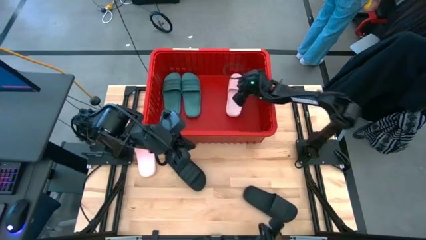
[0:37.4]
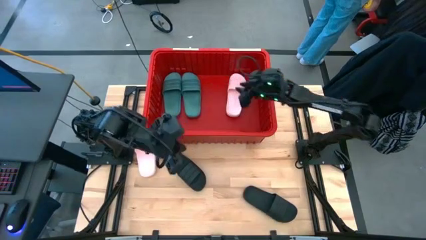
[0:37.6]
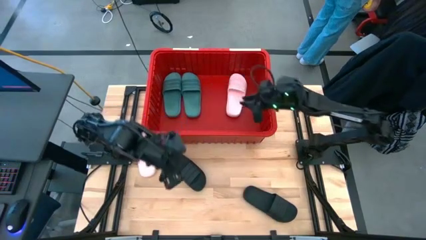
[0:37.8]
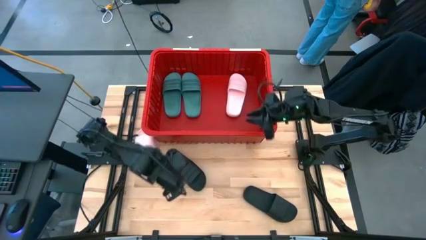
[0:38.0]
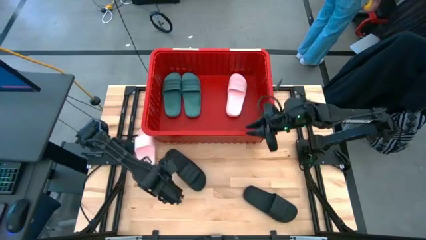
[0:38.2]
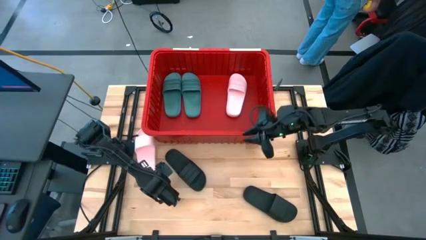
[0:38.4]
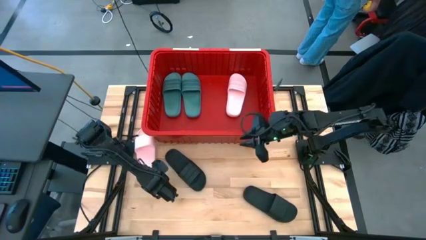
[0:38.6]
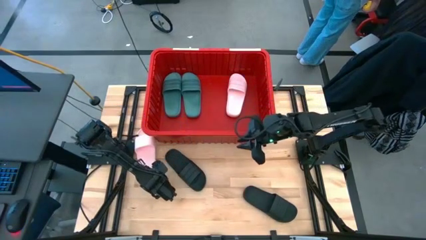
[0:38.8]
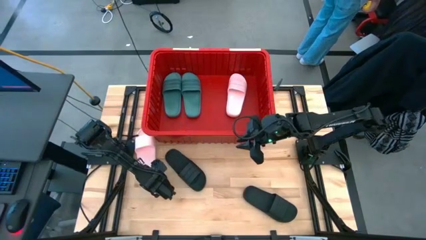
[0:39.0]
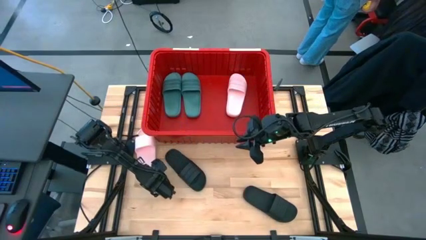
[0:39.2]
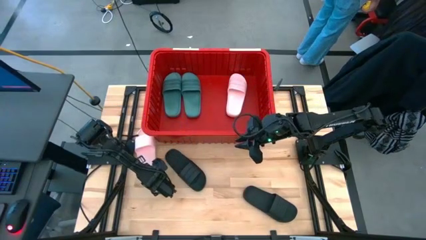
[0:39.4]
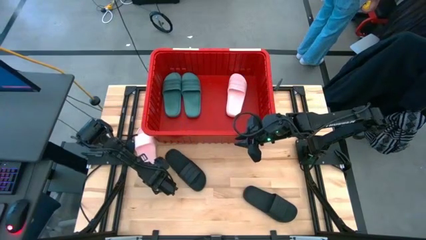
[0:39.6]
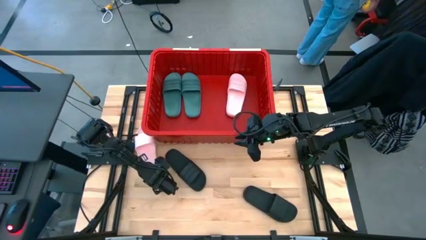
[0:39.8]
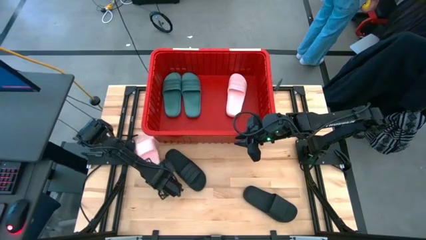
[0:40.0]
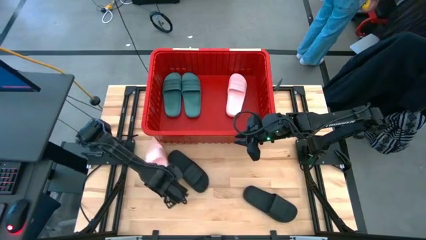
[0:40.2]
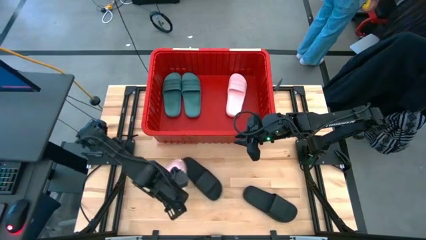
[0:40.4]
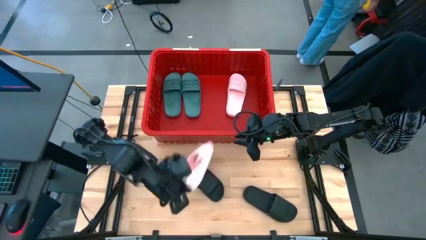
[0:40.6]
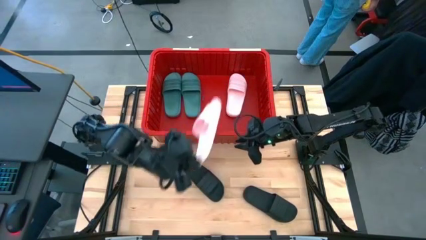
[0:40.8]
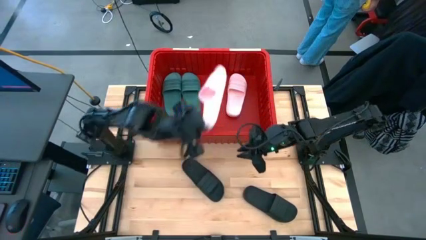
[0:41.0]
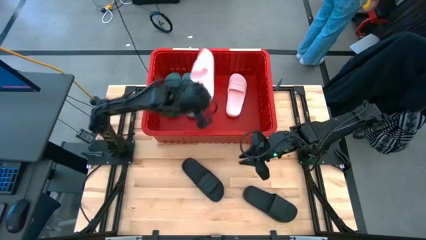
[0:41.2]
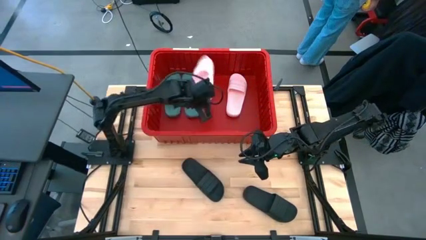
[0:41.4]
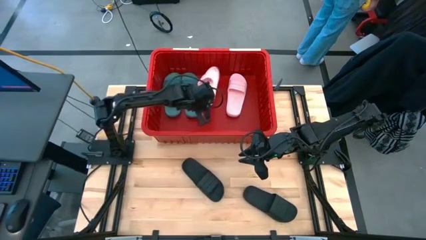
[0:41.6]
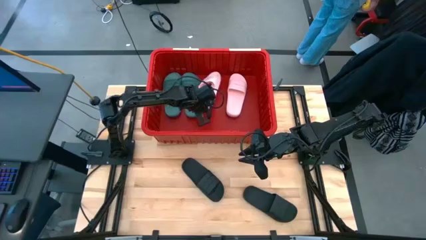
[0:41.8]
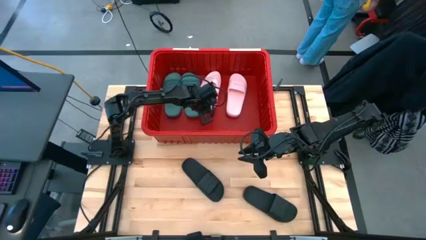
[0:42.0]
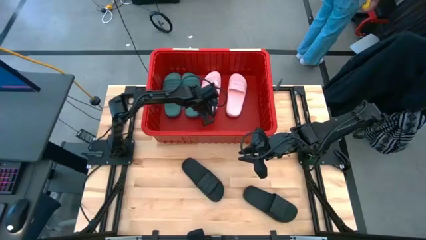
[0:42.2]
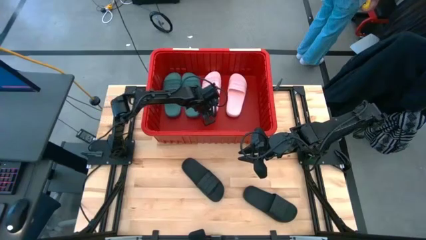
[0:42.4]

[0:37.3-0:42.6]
Task: Pick and place slides into bin
Put the pink slipper into the red bin

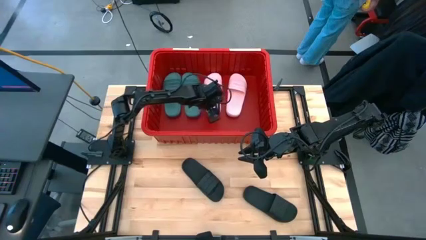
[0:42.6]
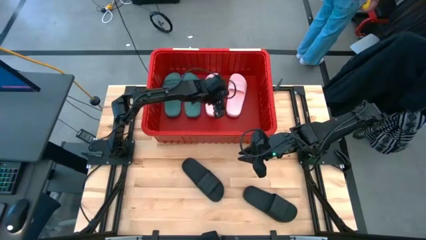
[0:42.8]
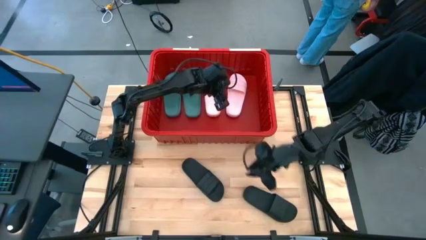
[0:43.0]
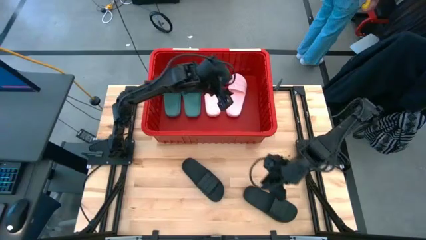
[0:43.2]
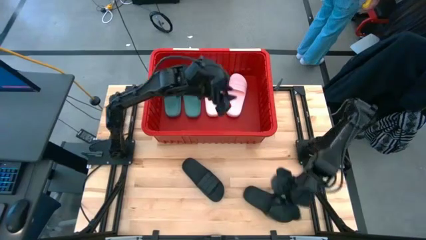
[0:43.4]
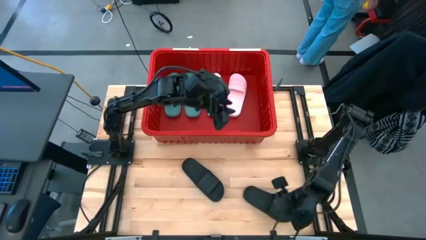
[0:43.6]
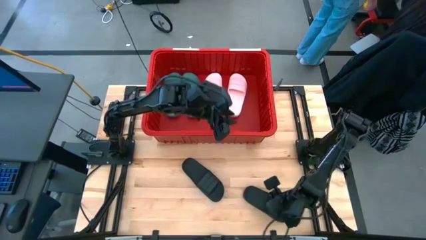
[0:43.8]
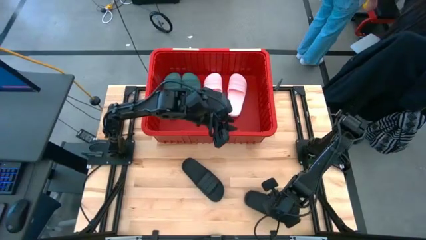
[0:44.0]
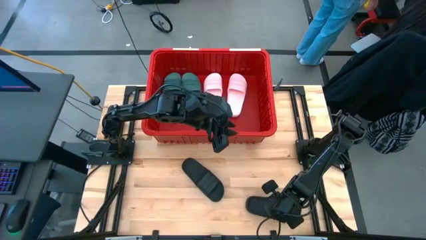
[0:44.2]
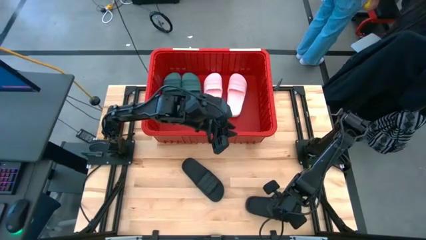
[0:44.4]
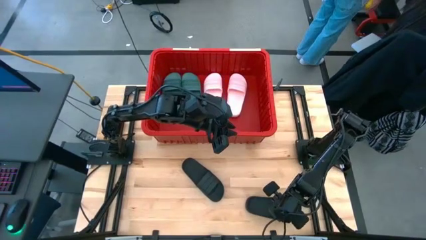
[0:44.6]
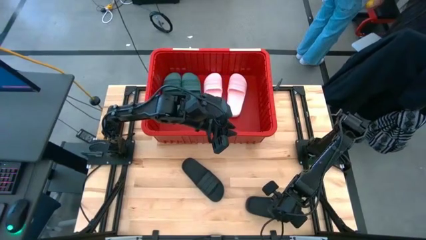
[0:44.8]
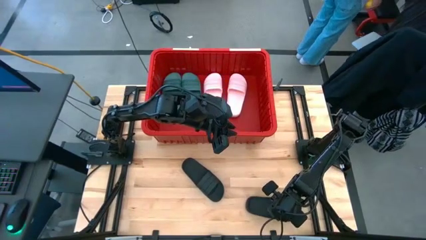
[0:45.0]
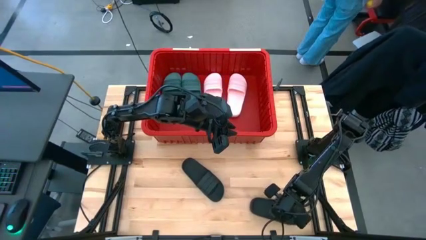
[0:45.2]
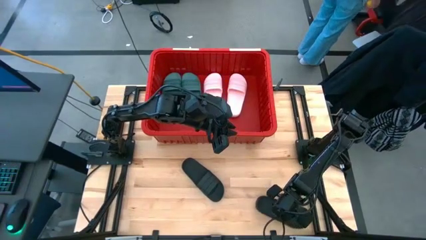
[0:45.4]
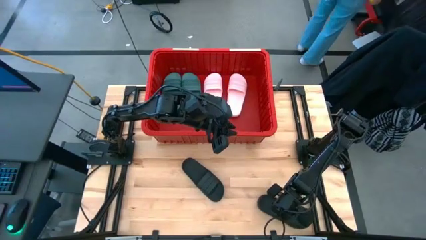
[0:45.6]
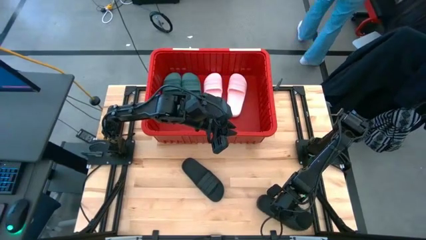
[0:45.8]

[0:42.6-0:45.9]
Put the right black slipper into the red bin

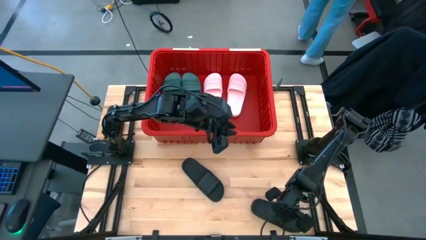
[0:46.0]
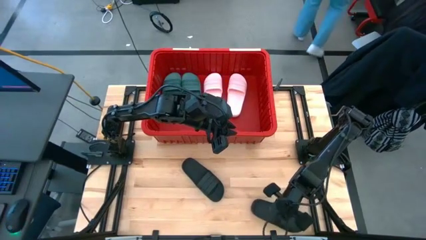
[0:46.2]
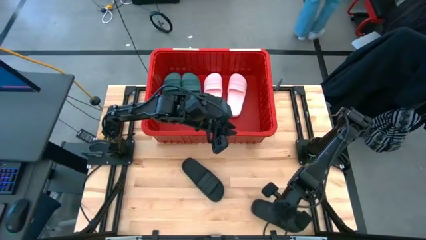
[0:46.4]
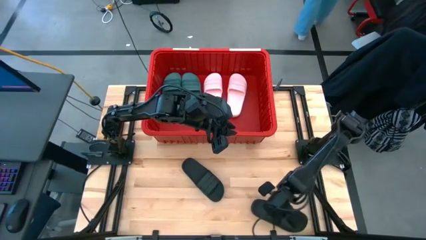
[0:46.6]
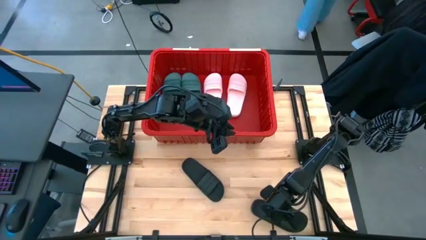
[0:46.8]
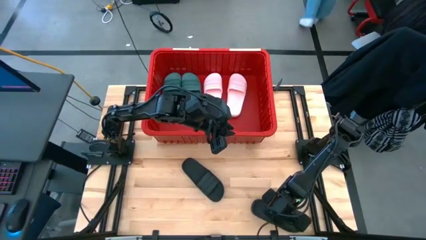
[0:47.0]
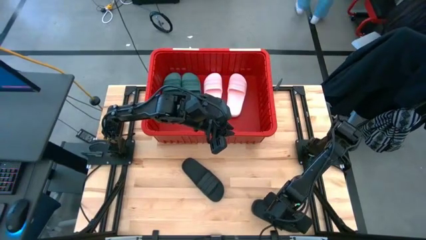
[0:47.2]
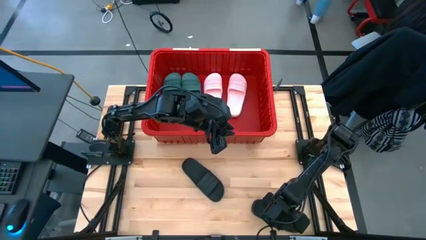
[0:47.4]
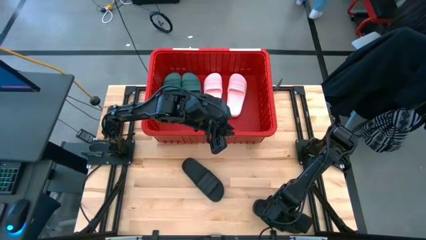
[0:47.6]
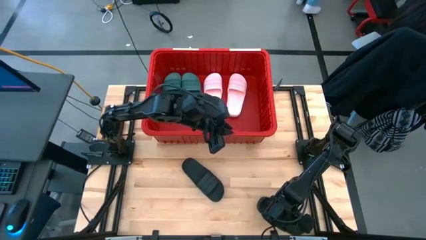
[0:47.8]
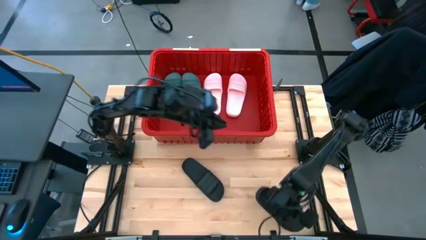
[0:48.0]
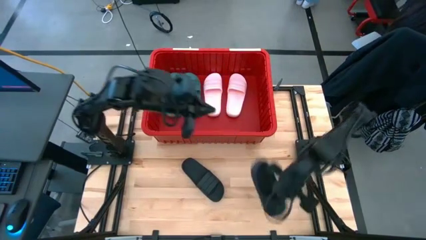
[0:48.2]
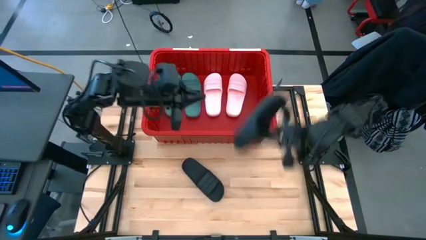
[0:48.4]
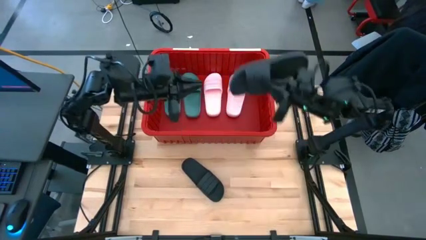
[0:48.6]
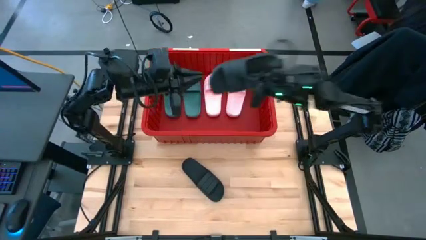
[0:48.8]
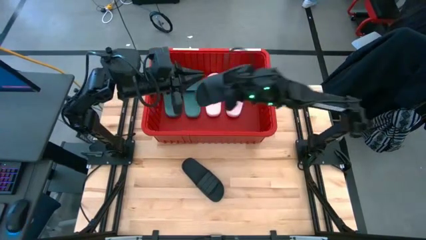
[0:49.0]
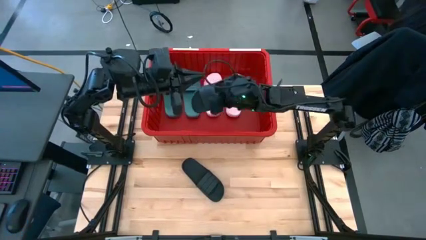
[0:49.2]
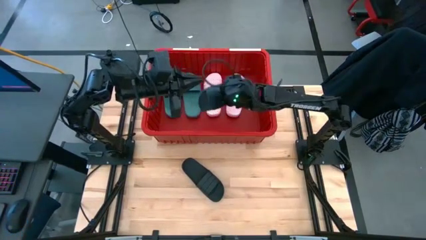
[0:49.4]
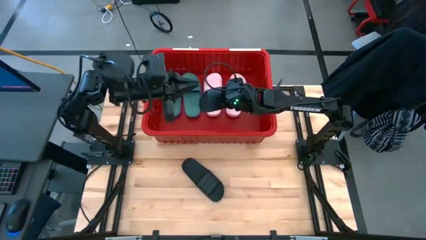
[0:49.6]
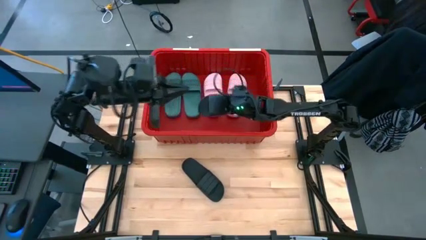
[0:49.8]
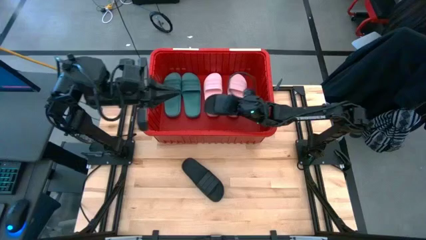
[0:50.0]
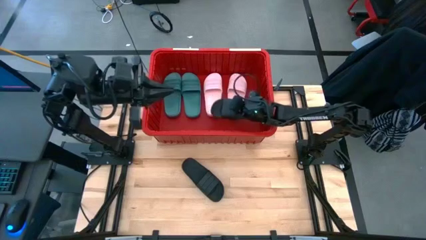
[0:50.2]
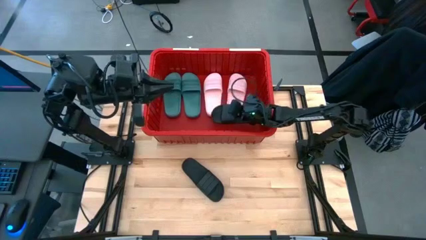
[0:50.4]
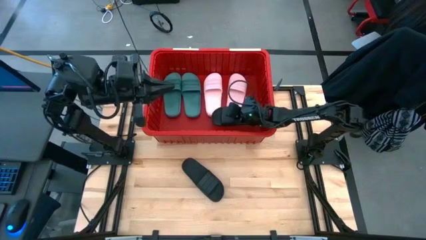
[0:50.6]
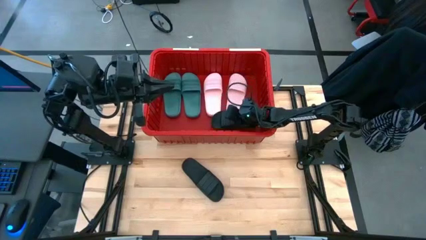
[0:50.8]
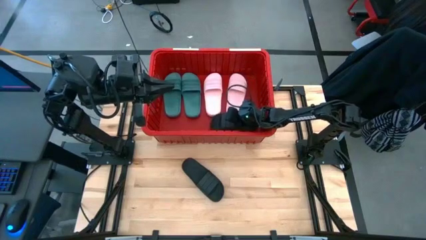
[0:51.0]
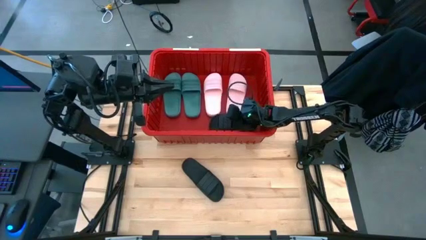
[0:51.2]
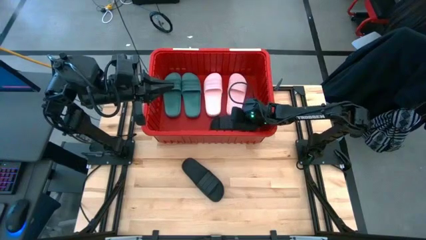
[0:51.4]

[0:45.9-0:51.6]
Put the right black slipper into the red bin

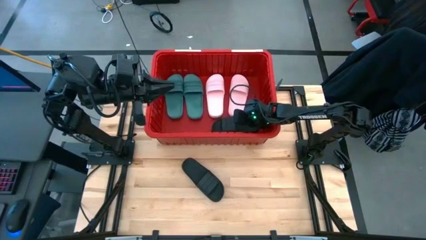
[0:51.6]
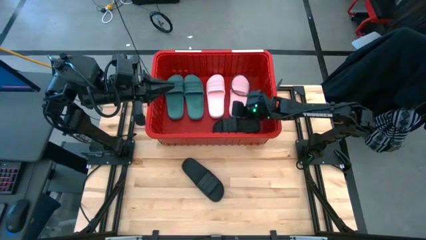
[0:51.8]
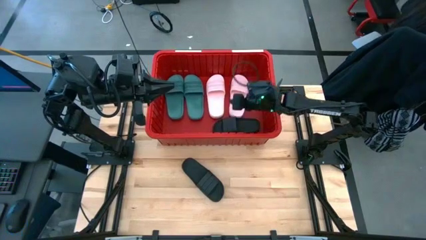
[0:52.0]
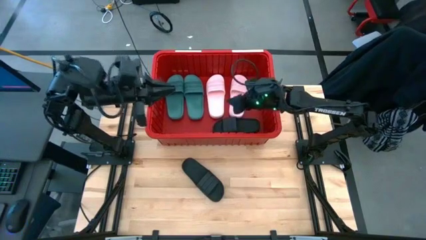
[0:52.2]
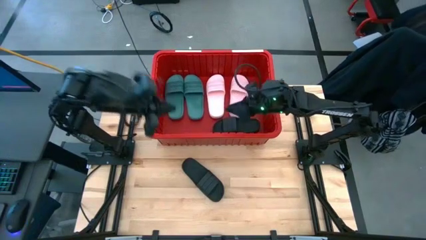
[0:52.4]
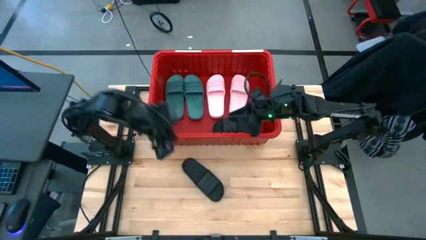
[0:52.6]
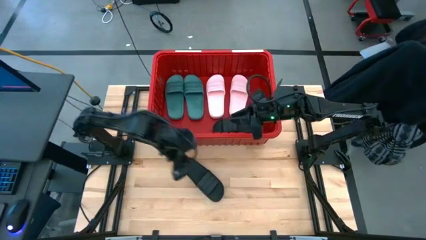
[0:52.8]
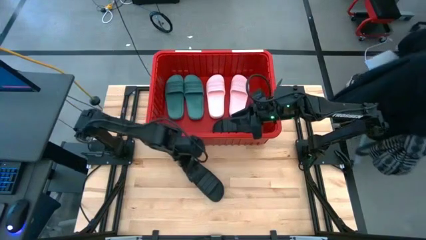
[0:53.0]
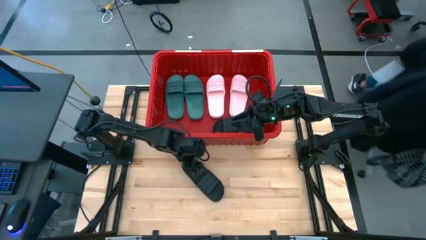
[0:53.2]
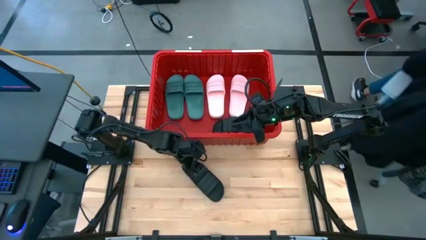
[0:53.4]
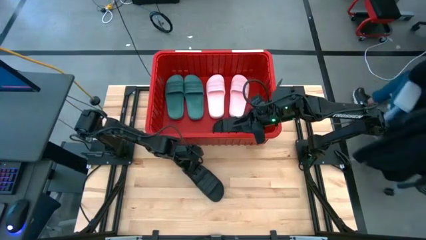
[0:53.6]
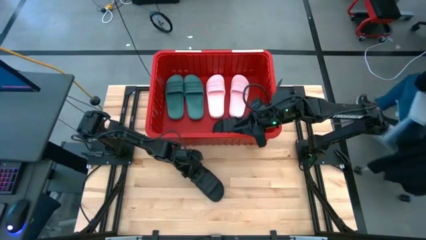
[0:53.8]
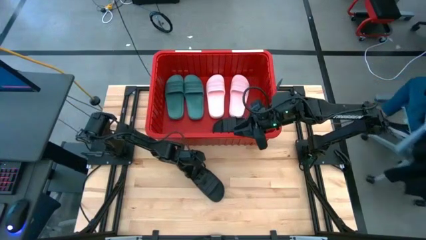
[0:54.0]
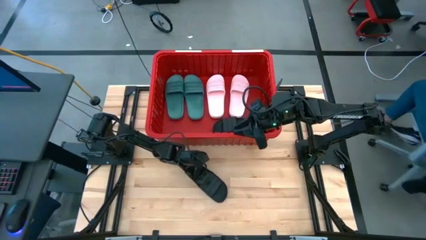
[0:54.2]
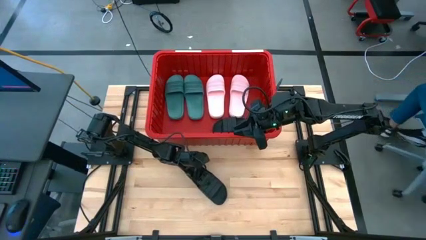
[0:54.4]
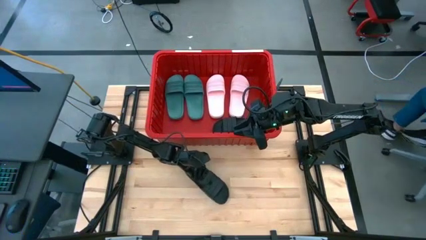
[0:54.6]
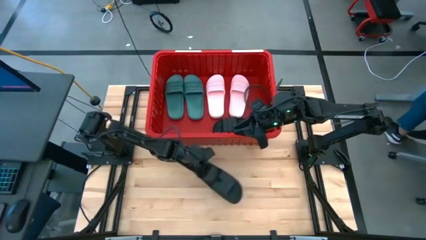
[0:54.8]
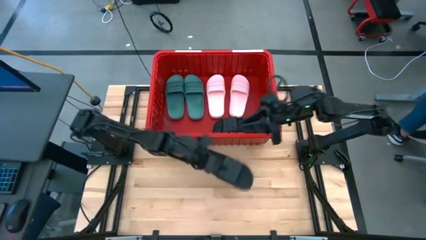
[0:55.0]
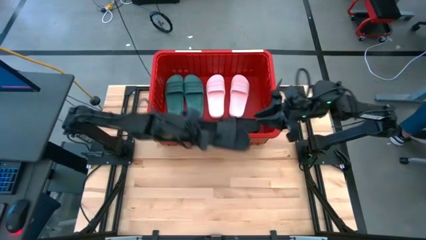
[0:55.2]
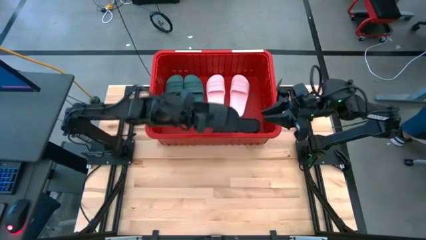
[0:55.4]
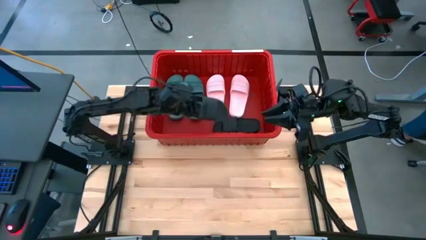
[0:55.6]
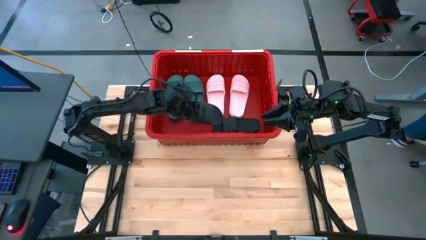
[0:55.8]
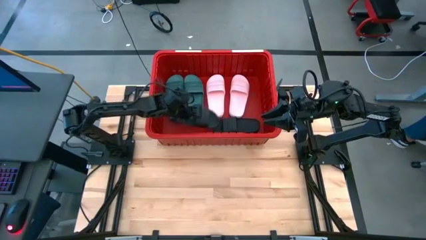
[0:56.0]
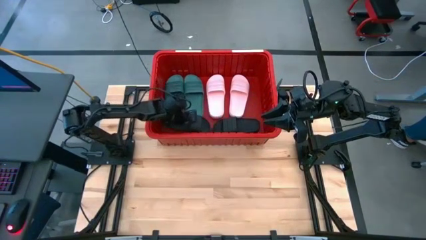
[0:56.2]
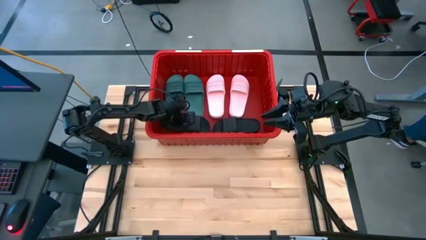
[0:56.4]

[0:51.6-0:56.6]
Put the black slipper into the red bin
